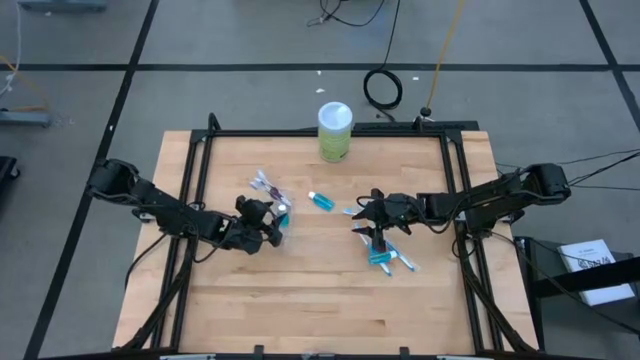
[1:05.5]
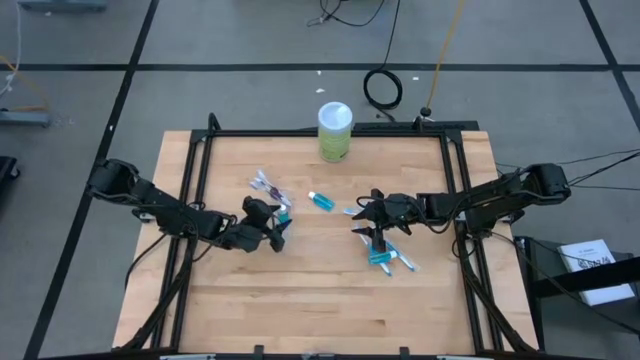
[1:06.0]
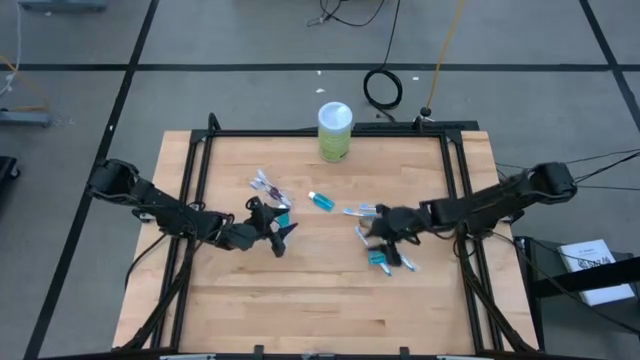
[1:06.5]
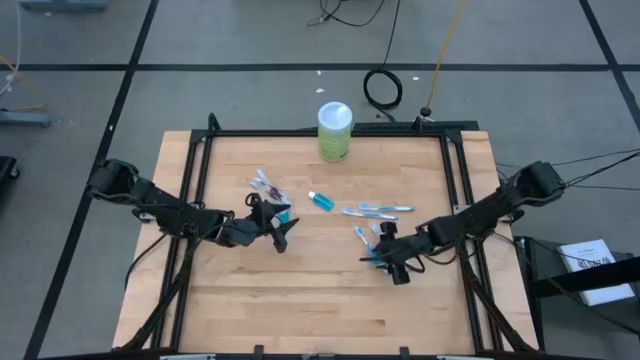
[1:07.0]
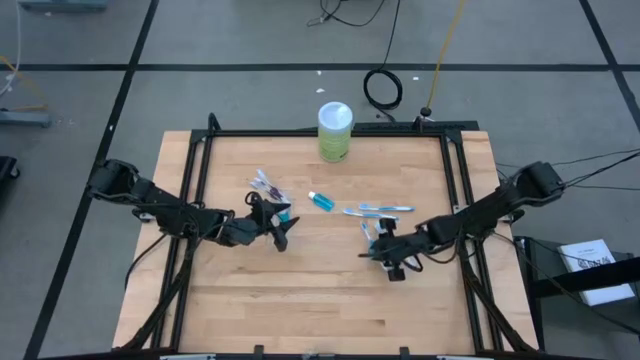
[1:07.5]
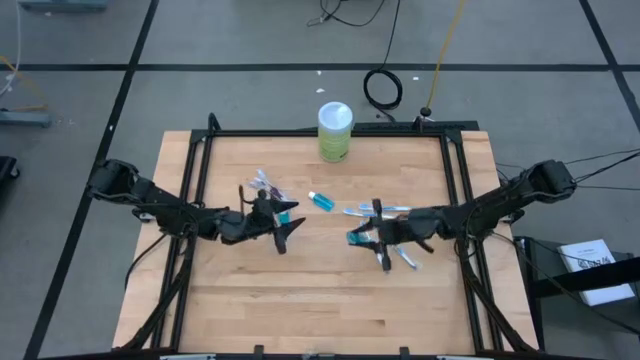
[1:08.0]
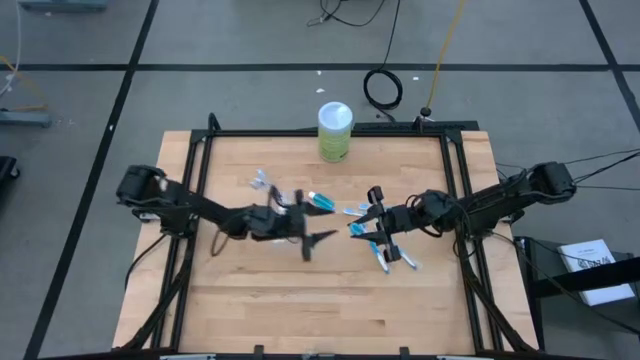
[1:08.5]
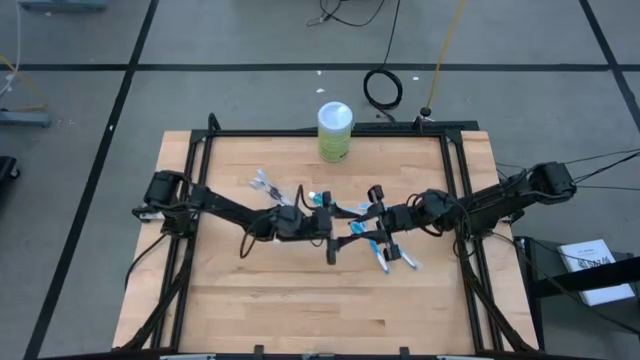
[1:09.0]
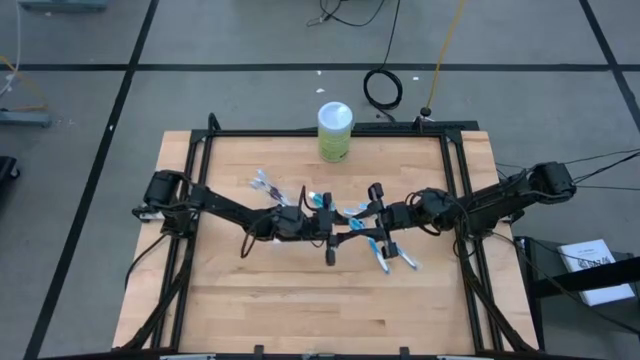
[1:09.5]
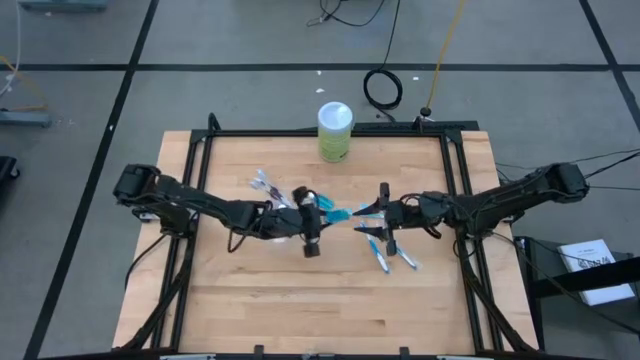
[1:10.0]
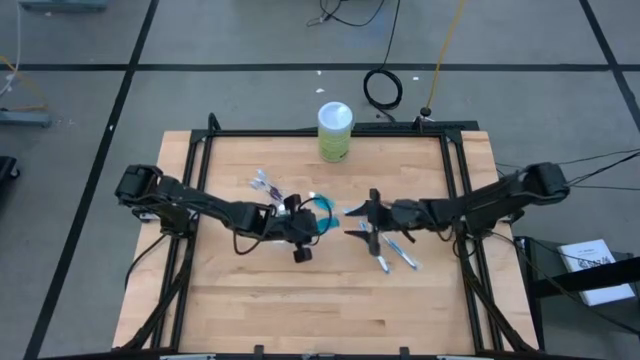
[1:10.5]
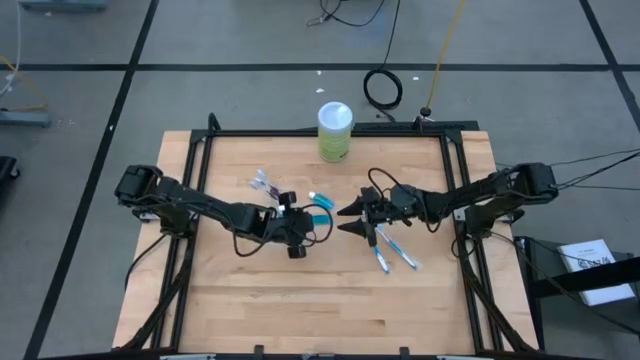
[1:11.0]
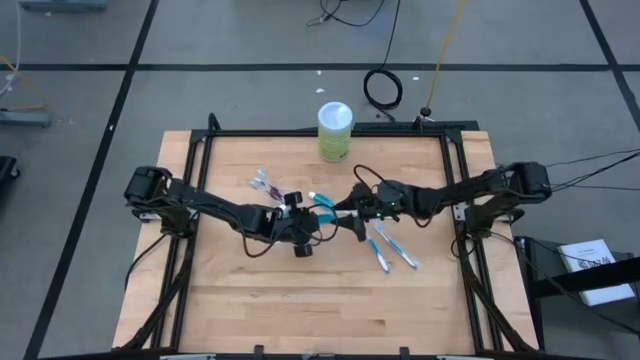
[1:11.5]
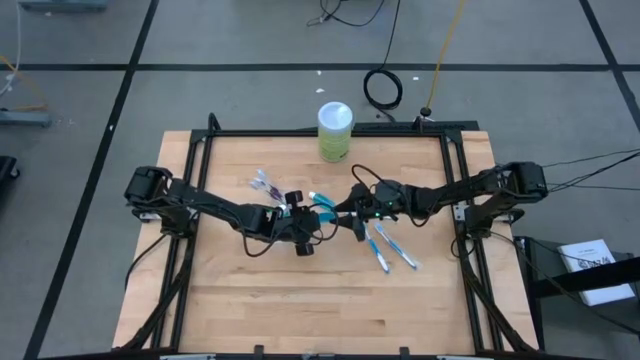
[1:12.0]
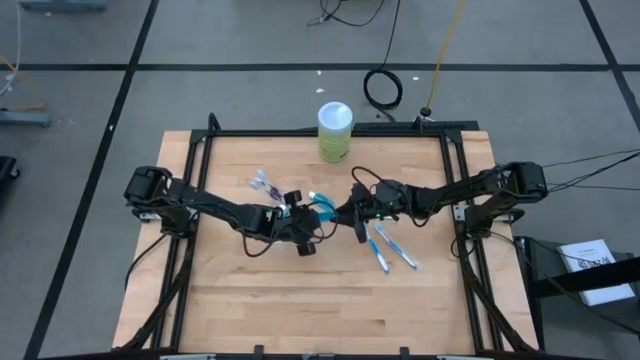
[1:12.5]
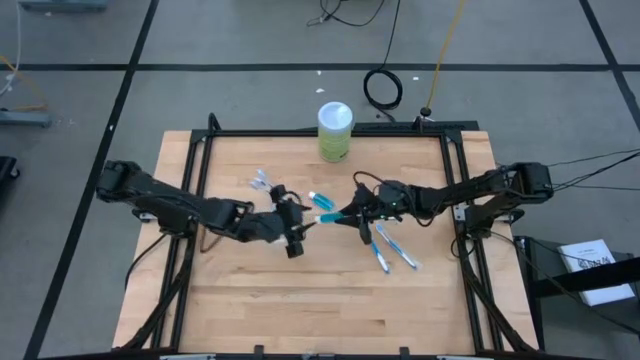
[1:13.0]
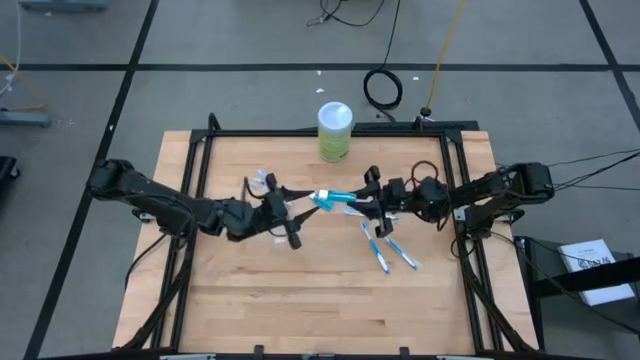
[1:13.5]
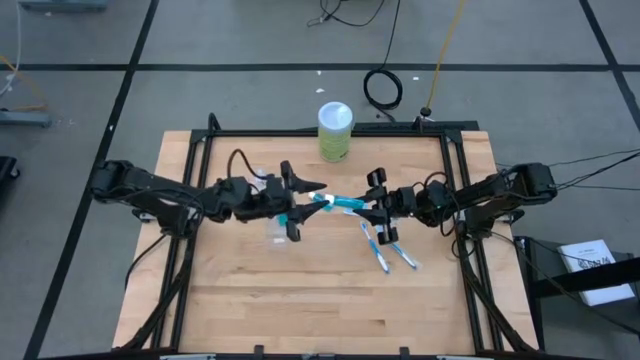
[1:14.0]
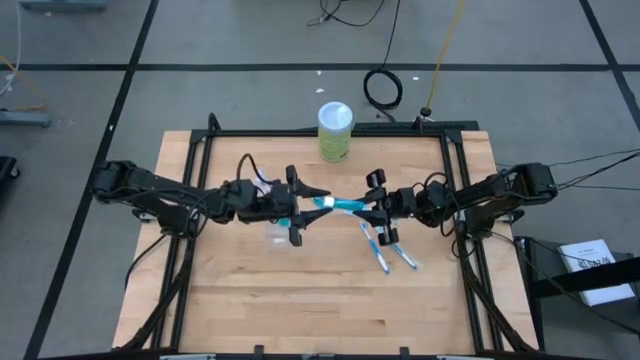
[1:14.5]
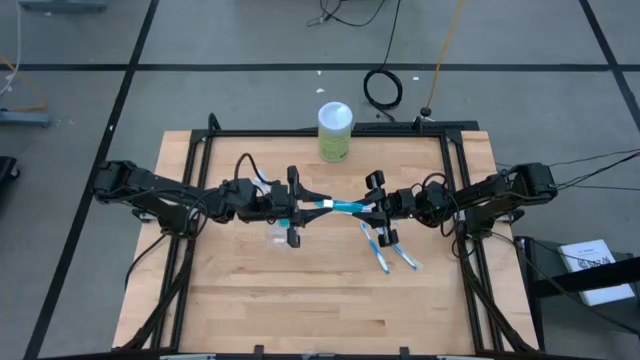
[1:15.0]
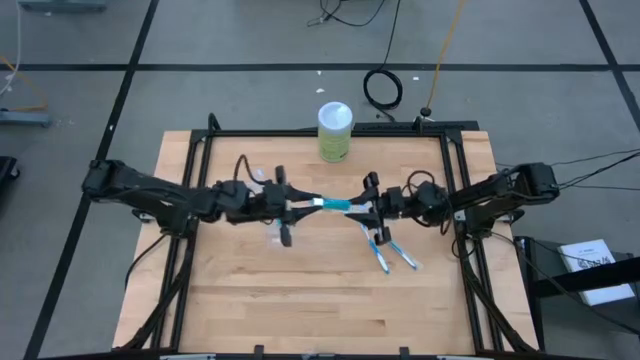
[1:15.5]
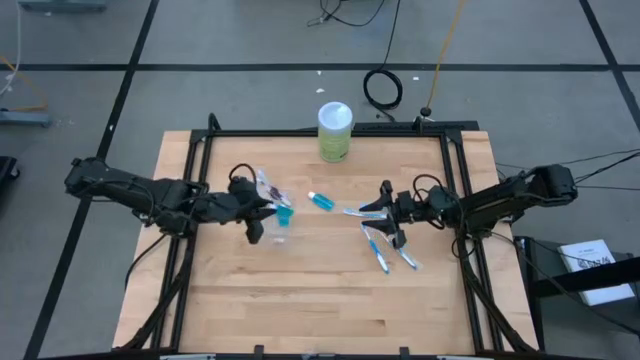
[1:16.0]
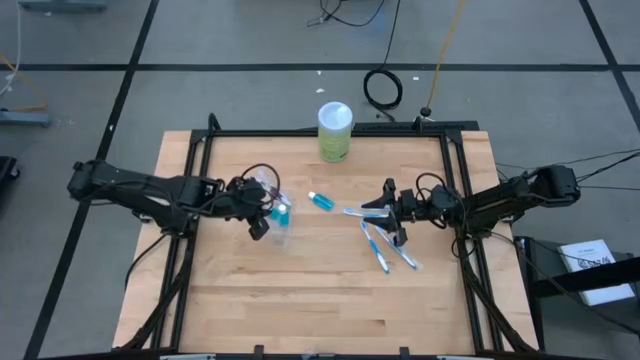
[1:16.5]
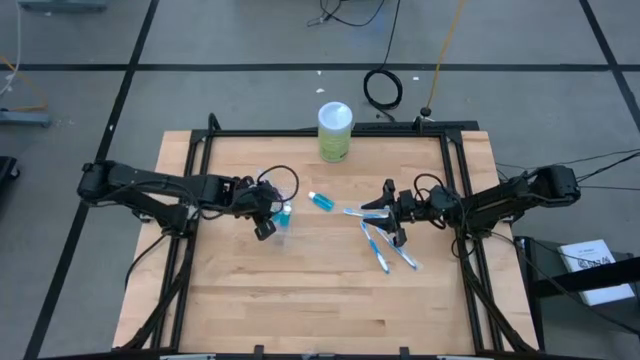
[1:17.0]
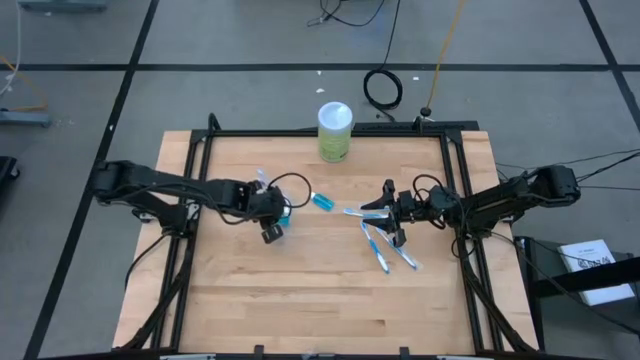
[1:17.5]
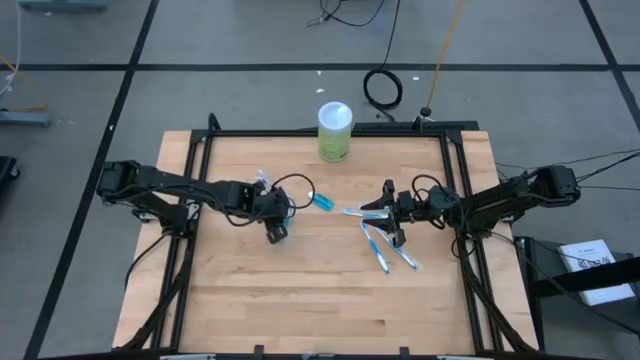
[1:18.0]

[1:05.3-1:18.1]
Task: Pick & Place toothbrushing station
Put the bottom blue mouthwash into the transparent organizer

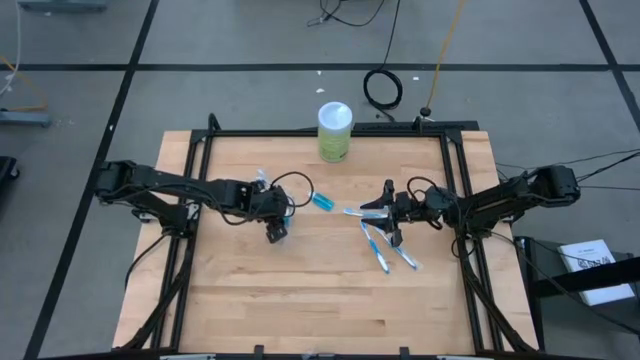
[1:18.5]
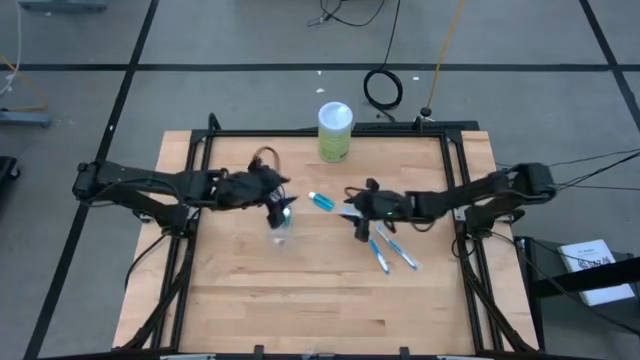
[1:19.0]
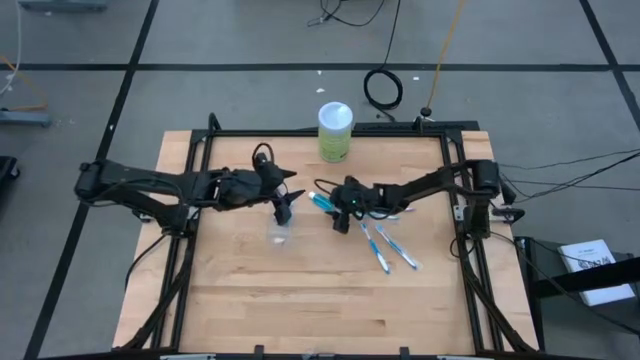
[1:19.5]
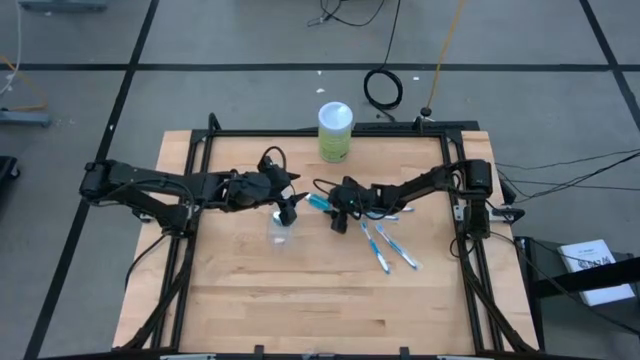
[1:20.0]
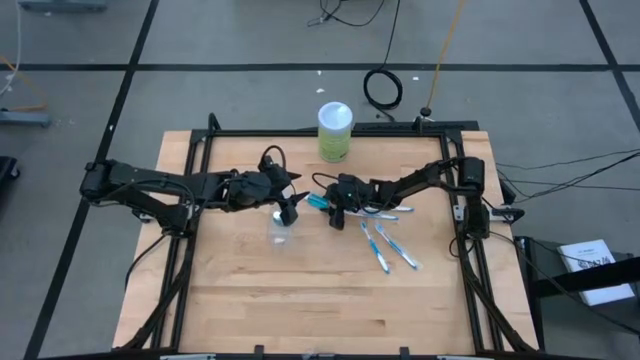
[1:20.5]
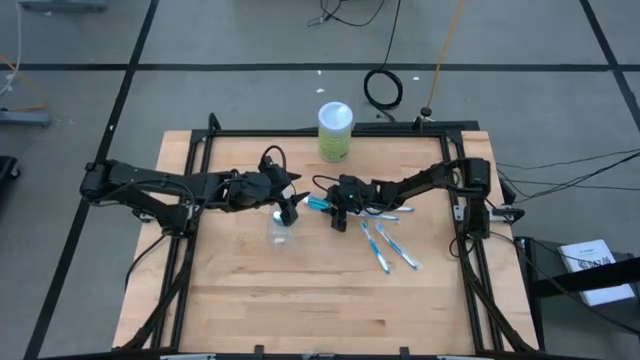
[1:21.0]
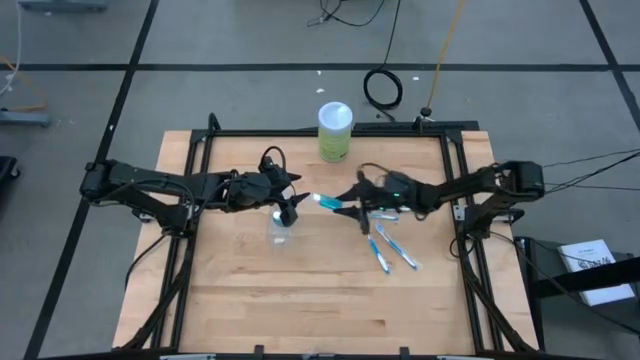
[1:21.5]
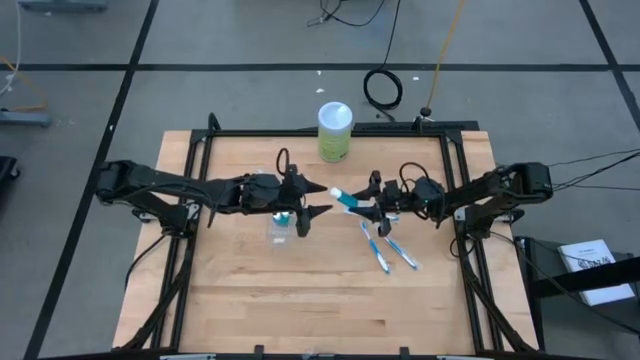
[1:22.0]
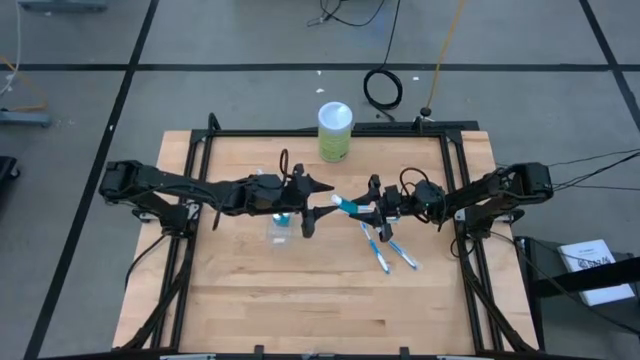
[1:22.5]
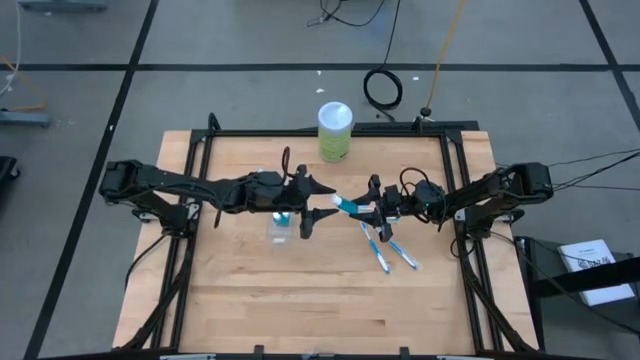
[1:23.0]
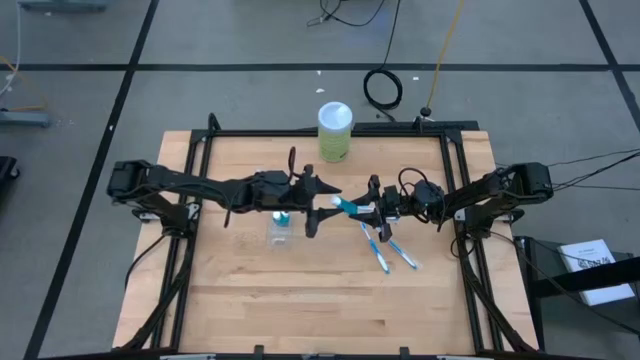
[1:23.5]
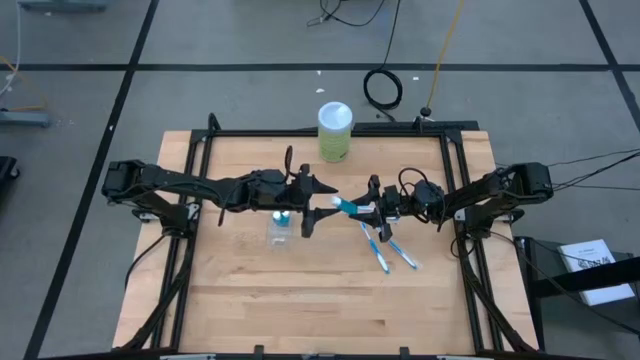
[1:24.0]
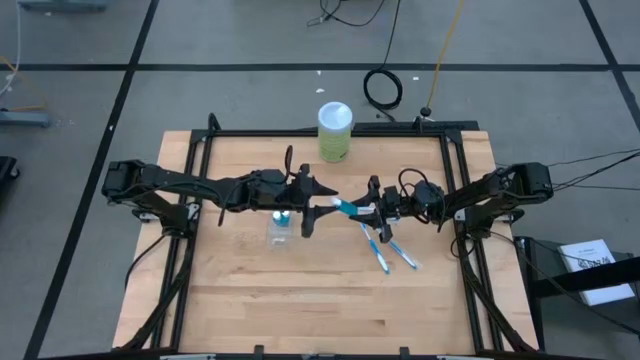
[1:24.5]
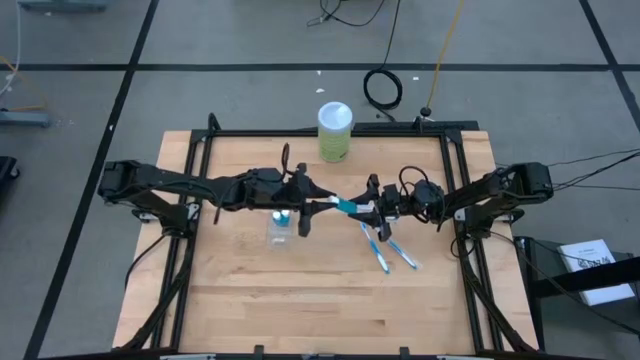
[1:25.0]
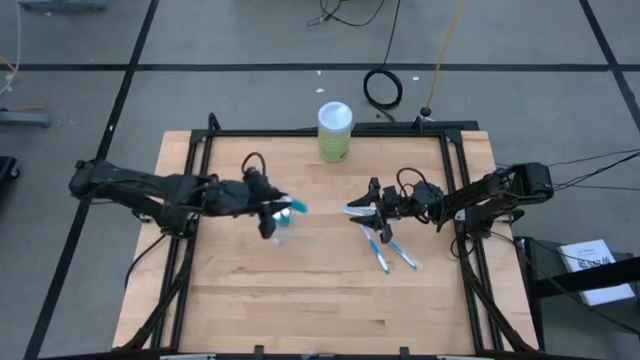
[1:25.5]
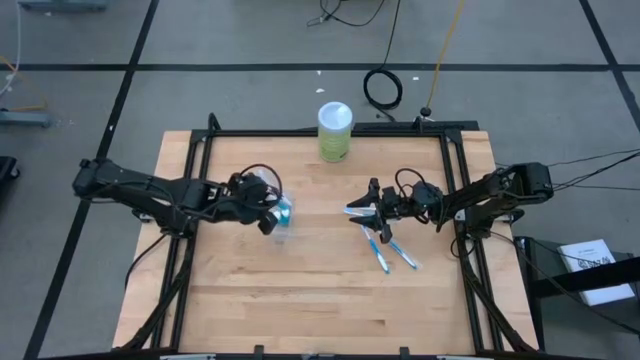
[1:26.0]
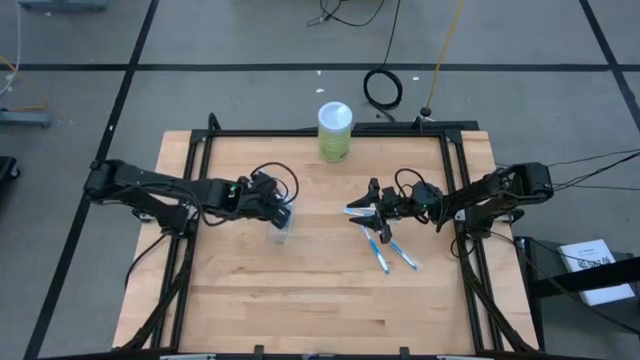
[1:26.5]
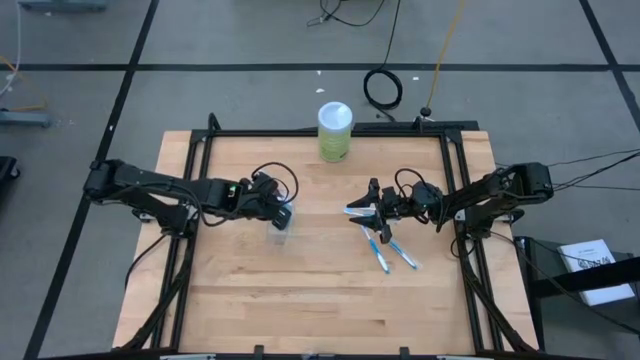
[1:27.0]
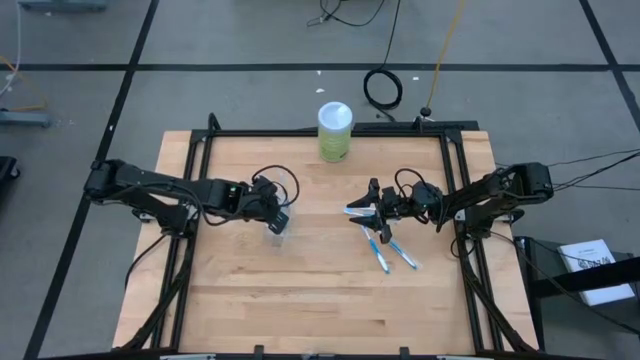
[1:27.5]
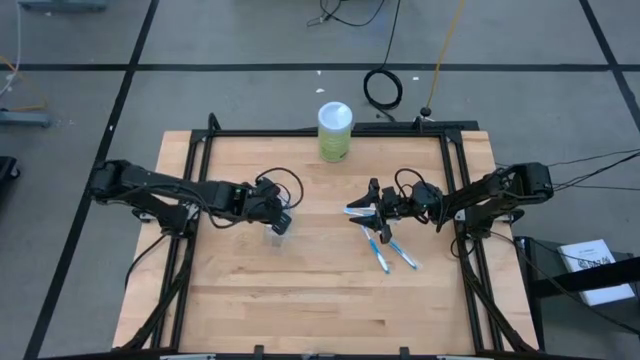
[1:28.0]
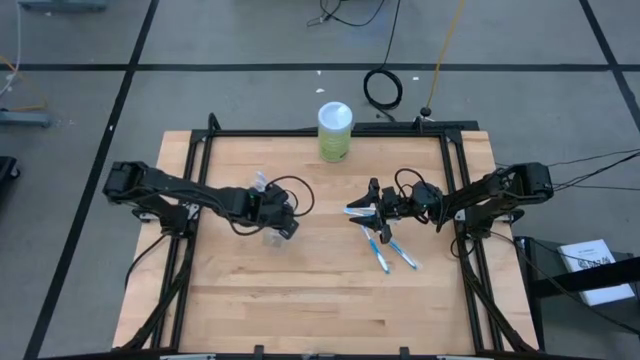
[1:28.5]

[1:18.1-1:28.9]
Put the blue mouthwash into the transparent organizer
